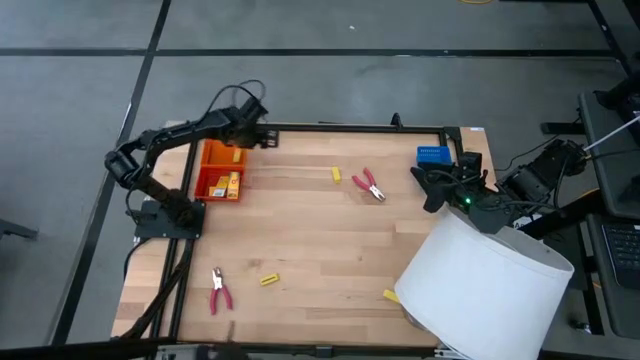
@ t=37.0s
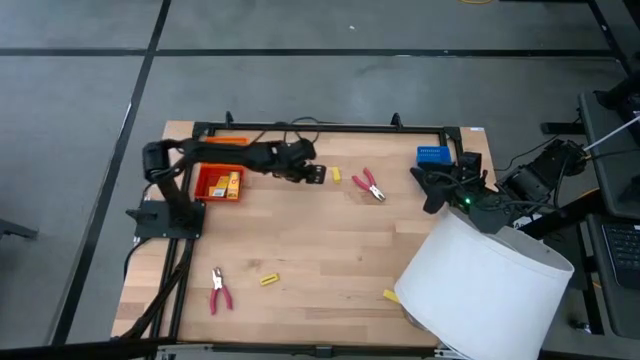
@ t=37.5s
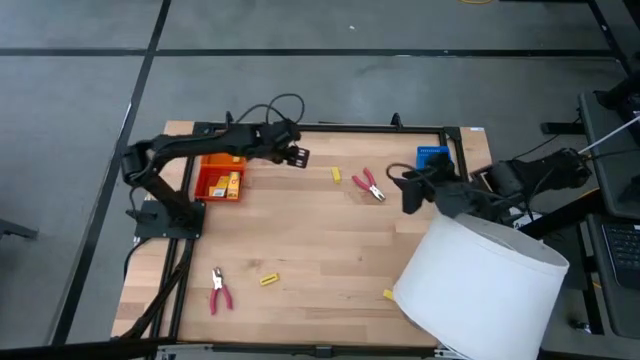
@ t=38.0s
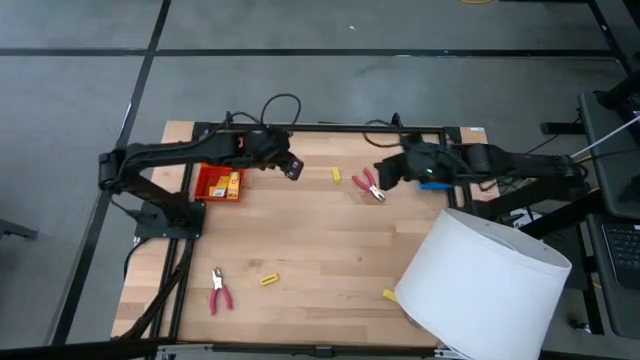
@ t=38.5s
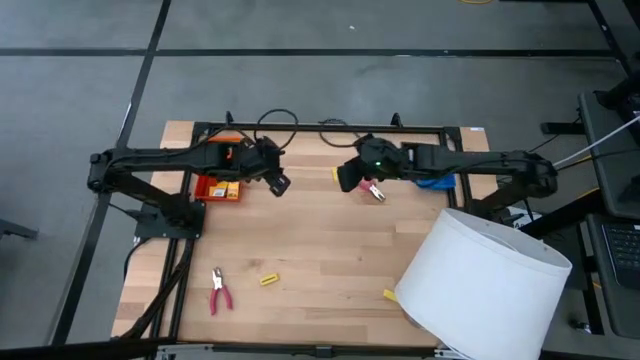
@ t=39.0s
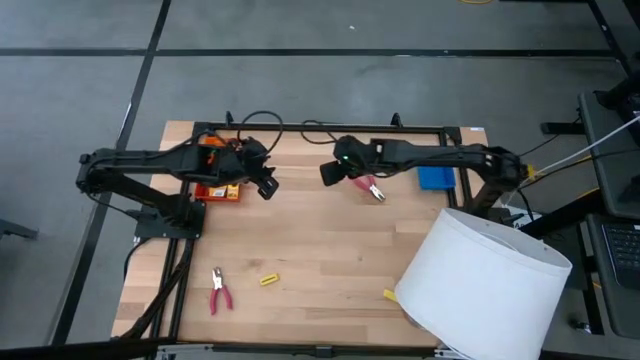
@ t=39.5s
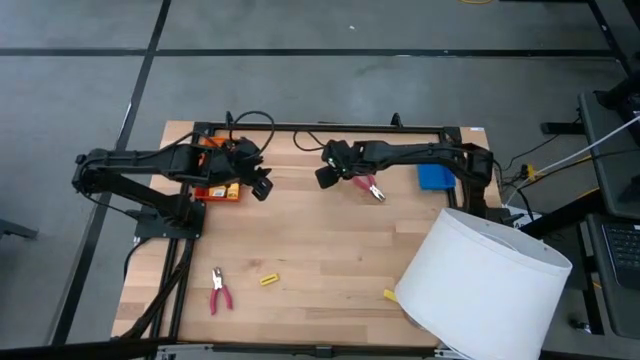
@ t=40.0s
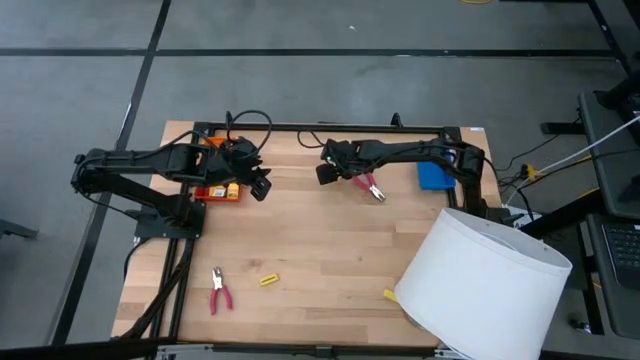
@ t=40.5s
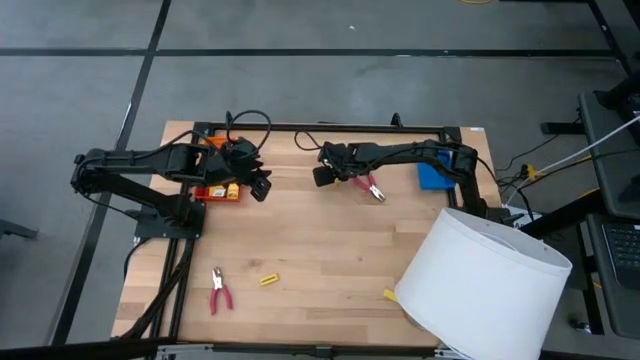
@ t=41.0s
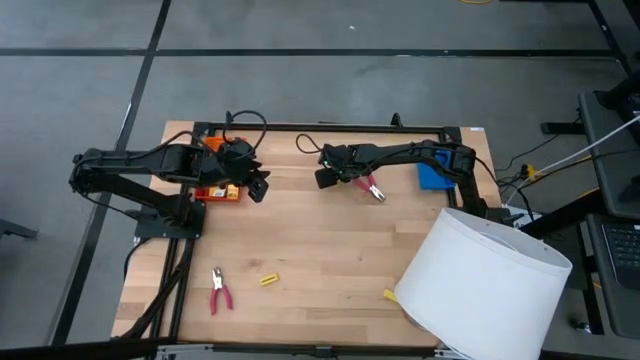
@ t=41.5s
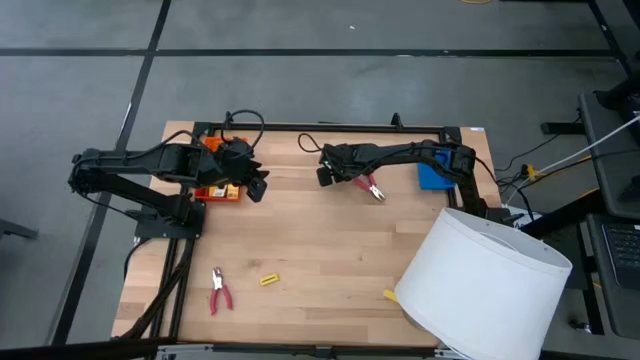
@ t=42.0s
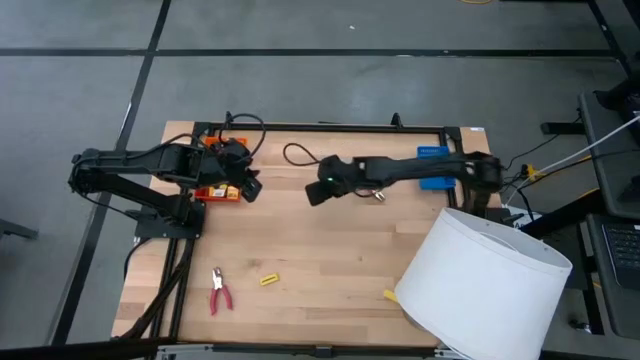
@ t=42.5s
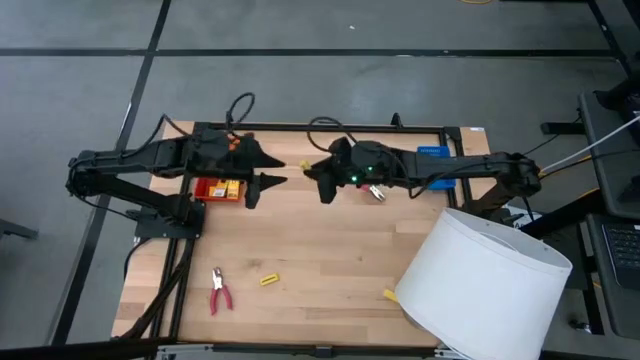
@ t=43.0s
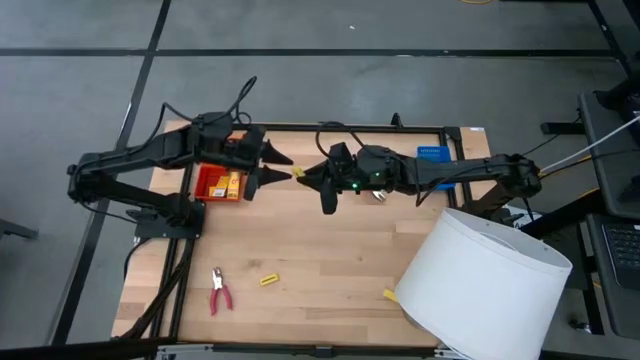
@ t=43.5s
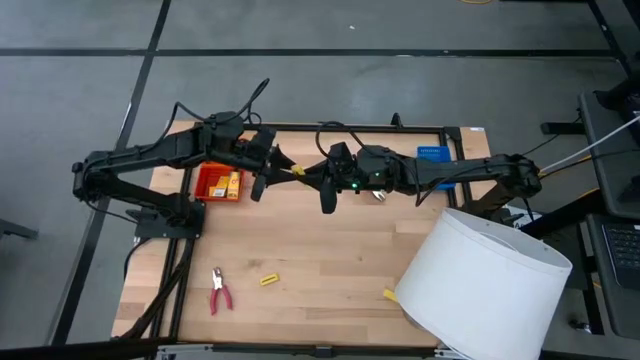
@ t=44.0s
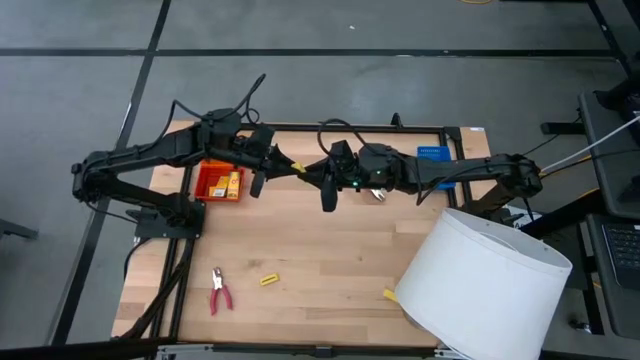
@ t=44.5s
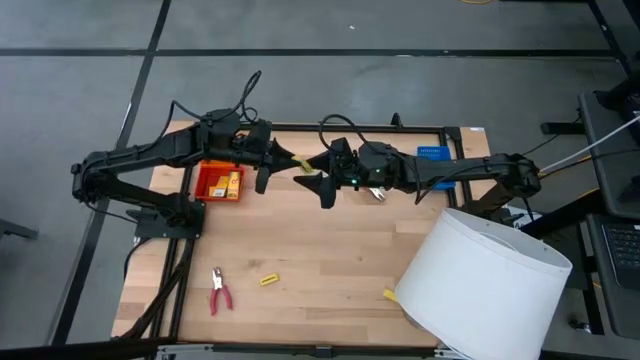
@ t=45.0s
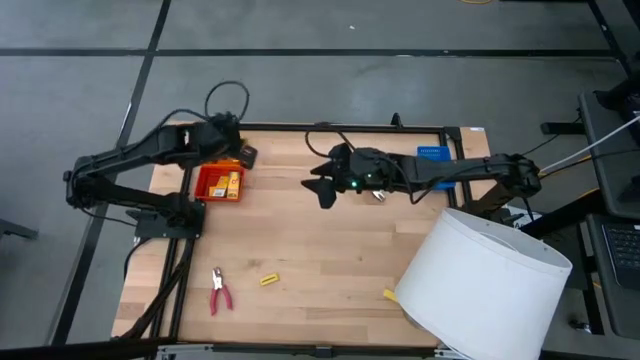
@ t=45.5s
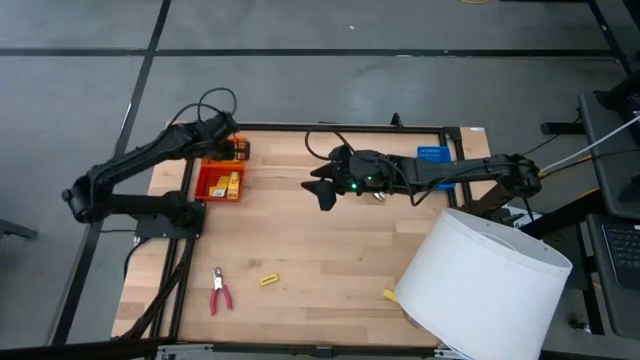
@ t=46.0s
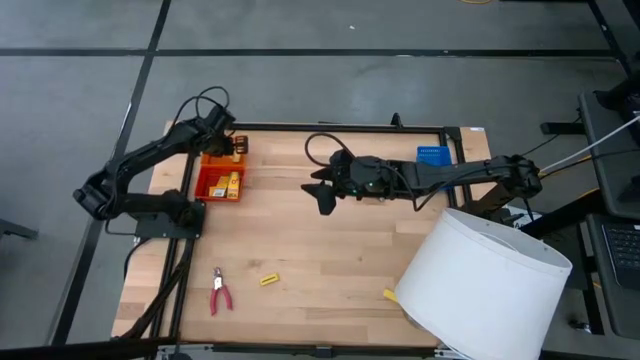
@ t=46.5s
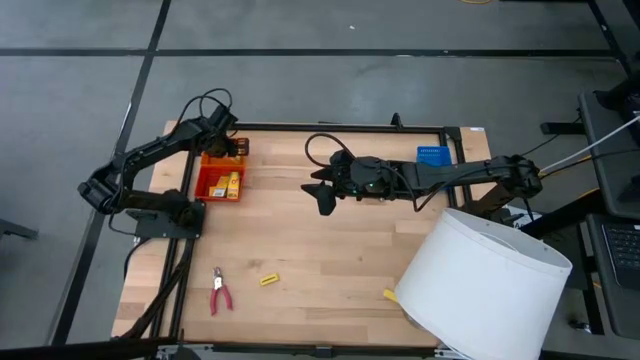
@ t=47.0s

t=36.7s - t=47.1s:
Task: Pick & Place School Supplies
Put the top yellow eraser into the orange bin

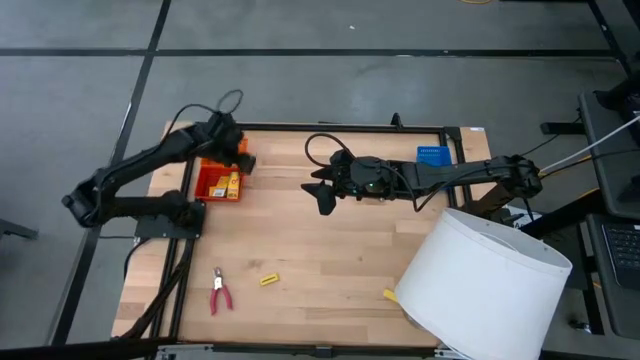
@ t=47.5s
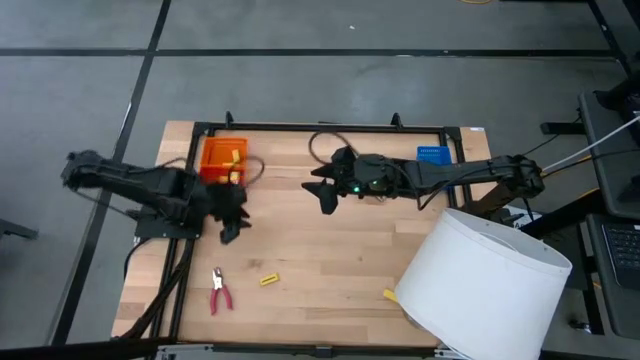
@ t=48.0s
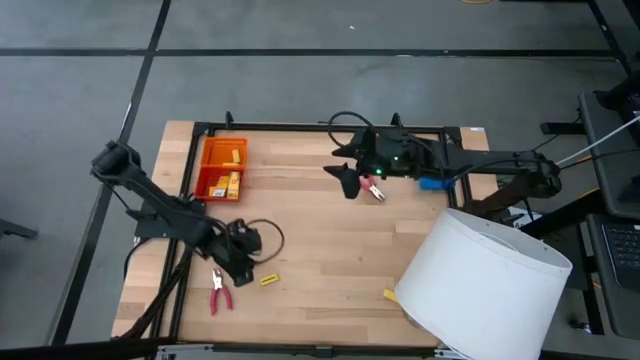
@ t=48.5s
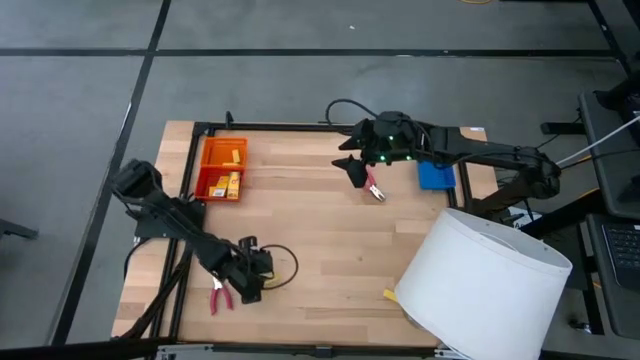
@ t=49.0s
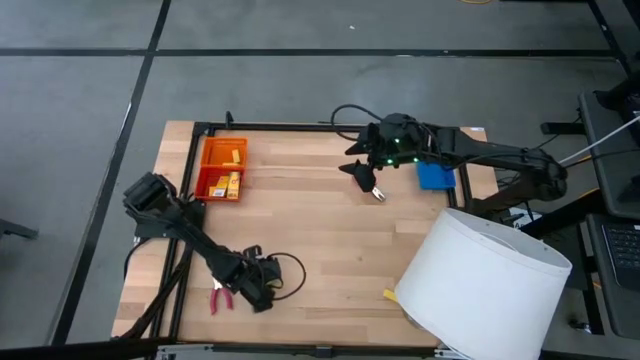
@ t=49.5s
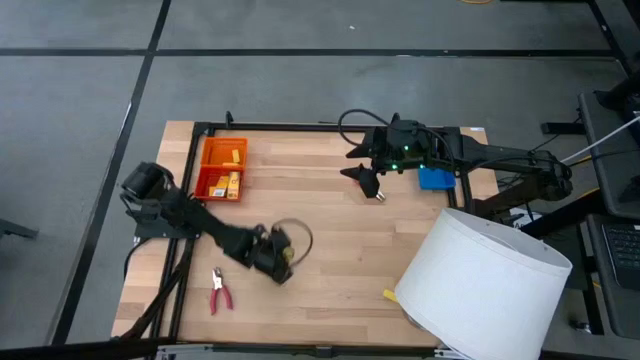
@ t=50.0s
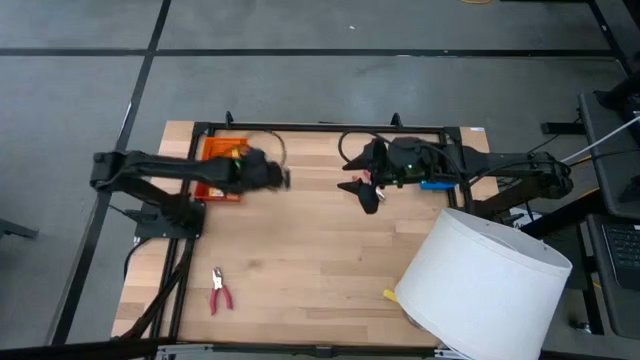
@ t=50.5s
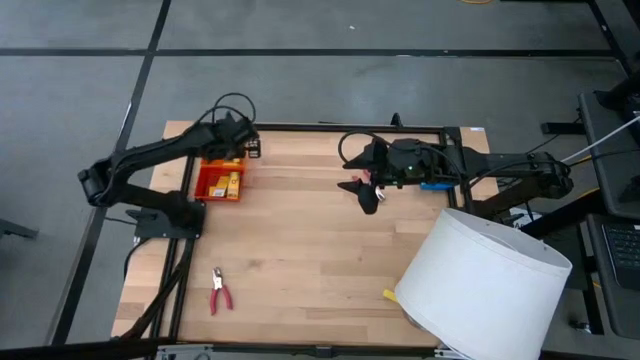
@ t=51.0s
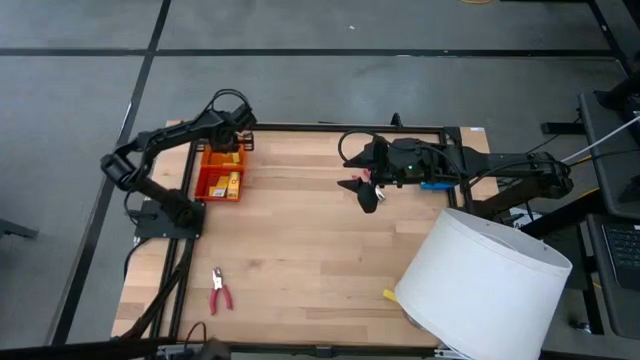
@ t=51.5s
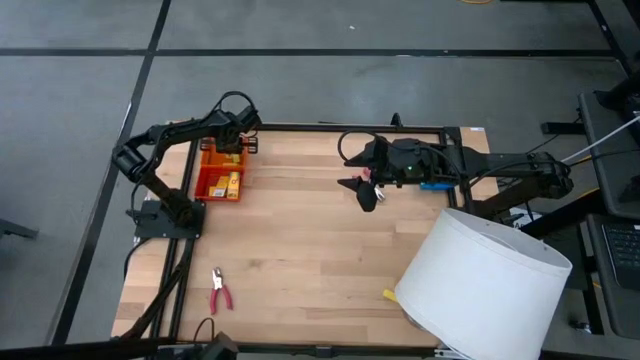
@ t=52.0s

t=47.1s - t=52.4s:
Put the left yellow eraser into the orange bin

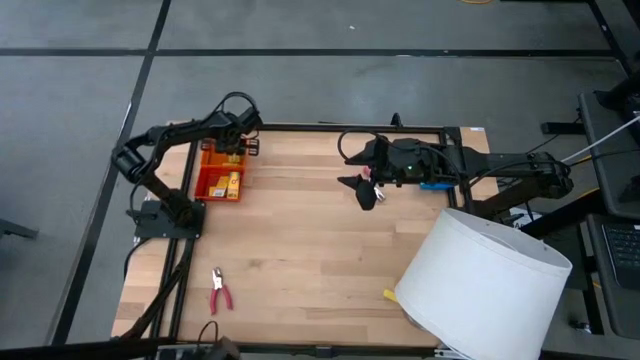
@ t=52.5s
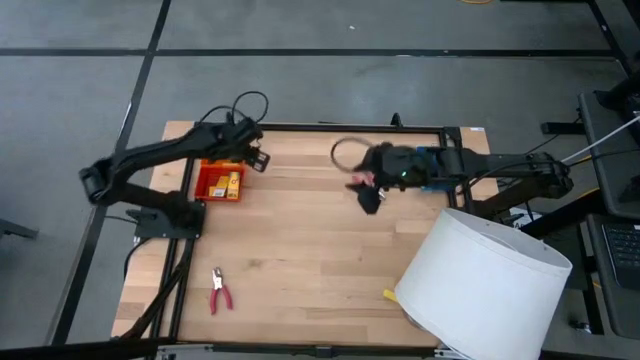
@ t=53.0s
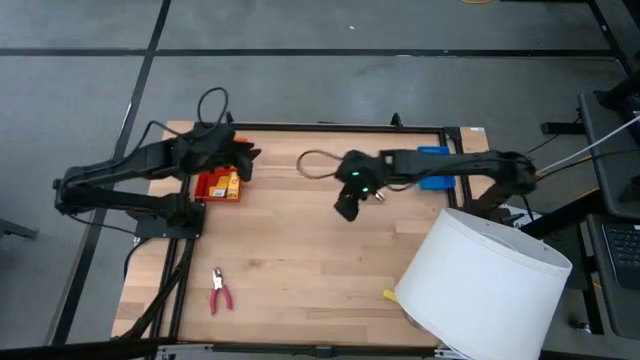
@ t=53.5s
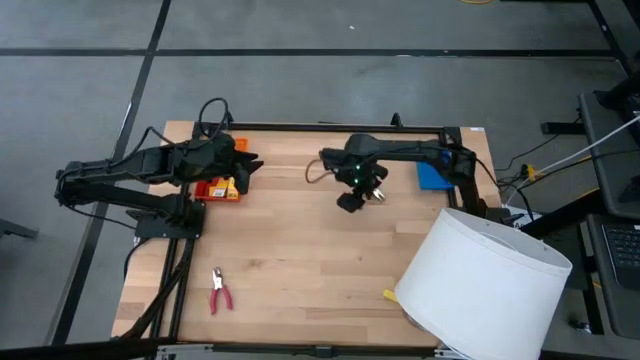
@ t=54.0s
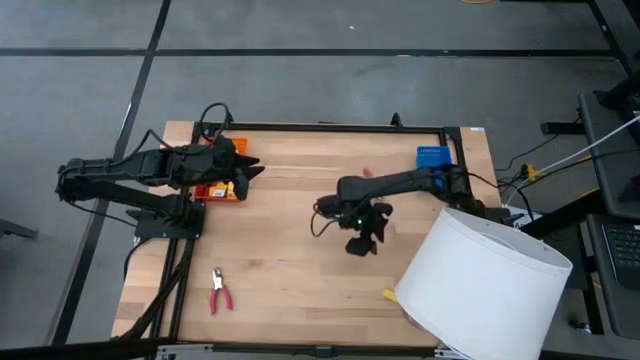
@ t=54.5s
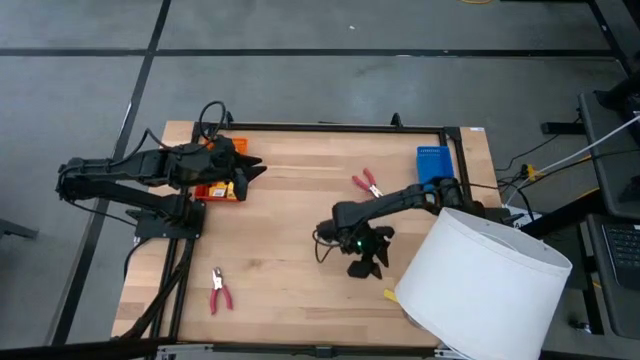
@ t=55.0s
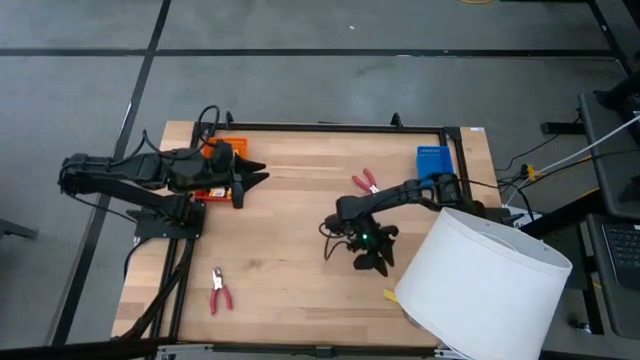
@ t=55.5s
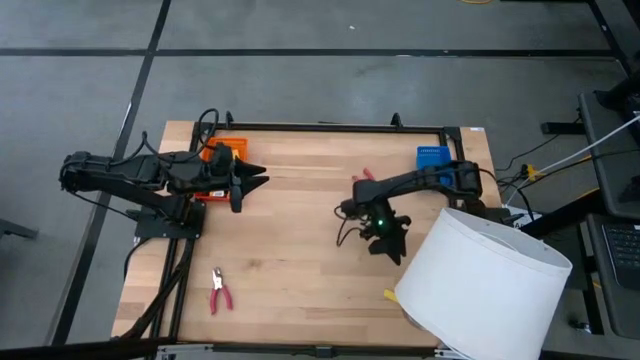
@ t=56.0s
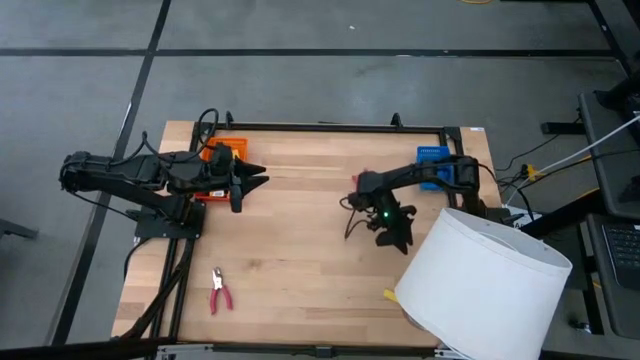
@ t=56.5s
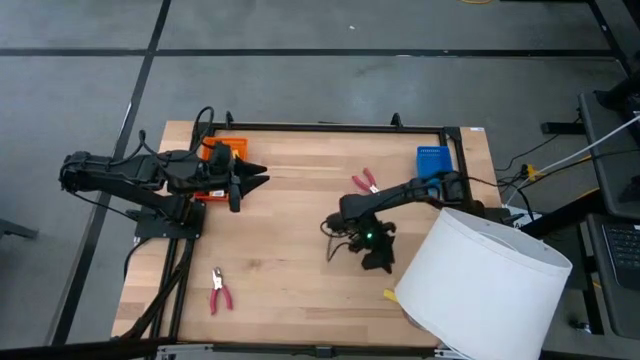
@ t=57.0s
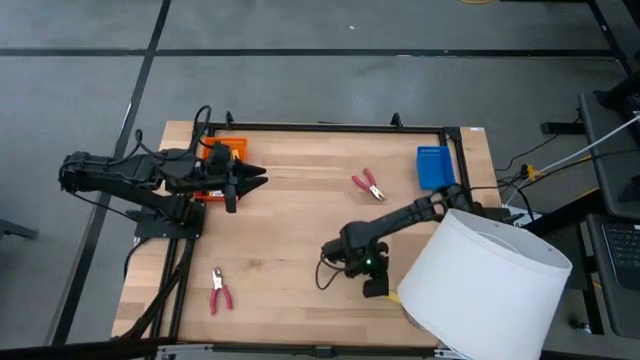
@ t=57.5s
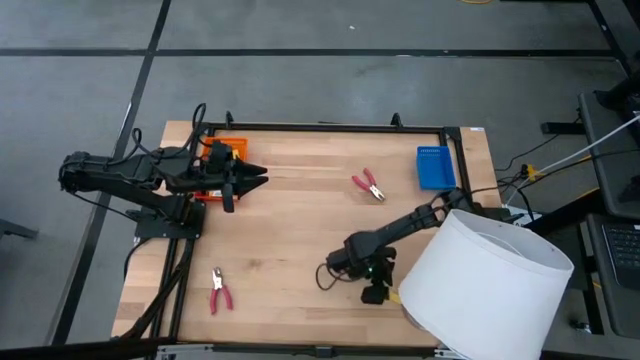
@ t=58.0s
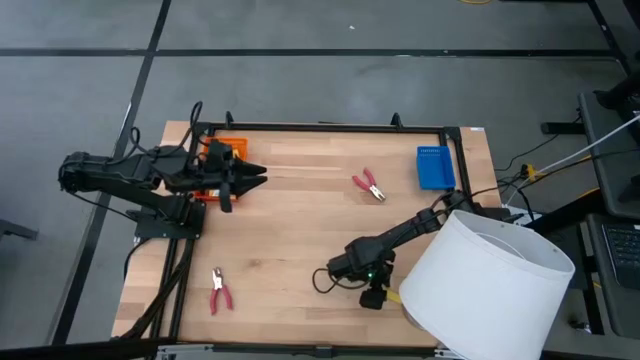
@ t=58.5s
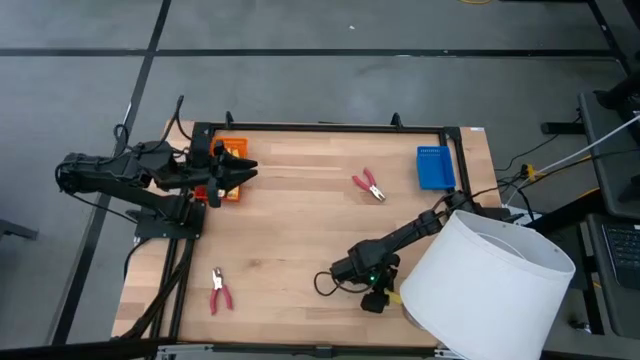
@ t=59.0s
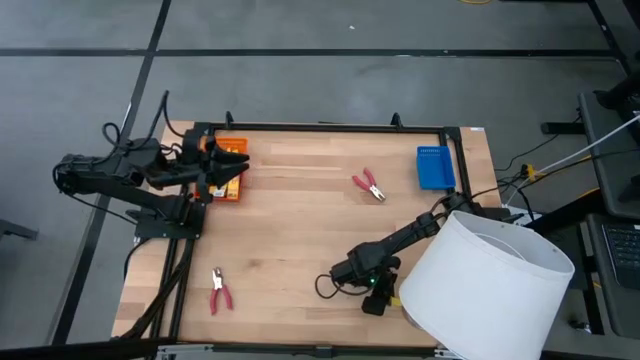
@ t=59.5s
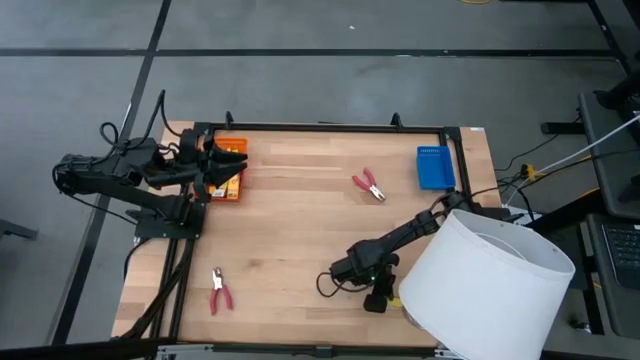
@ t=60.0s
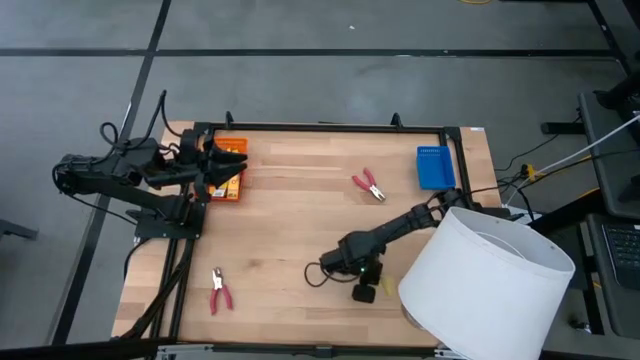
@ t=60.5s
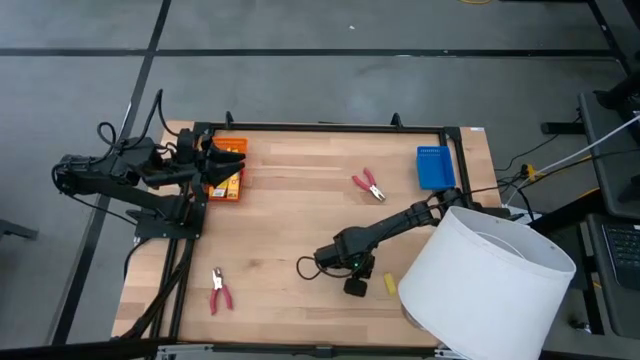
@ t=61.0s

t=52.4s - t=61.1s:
Put the yellow eraser into the orange bin
